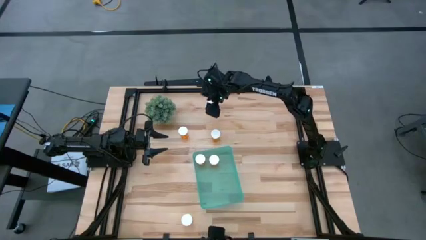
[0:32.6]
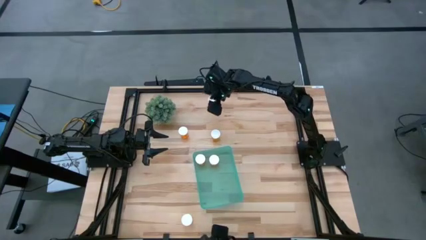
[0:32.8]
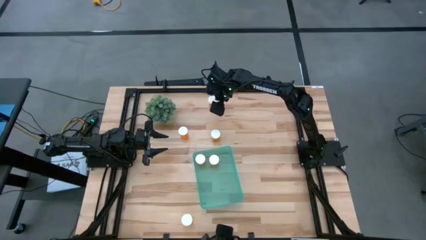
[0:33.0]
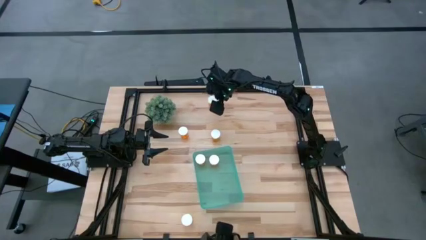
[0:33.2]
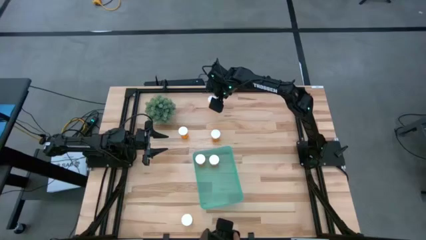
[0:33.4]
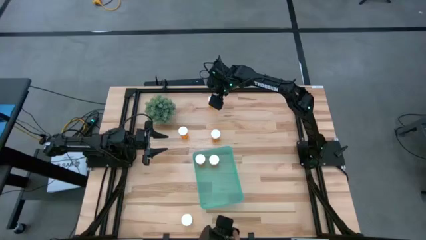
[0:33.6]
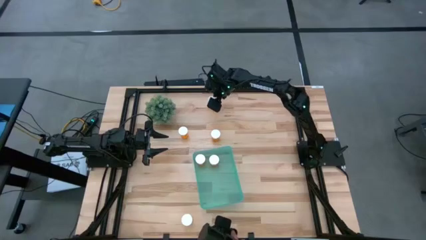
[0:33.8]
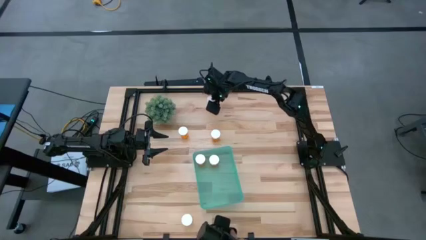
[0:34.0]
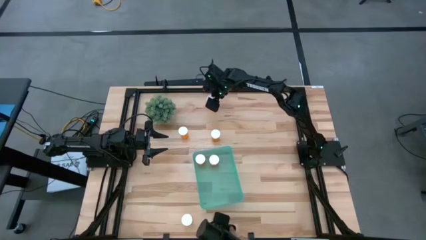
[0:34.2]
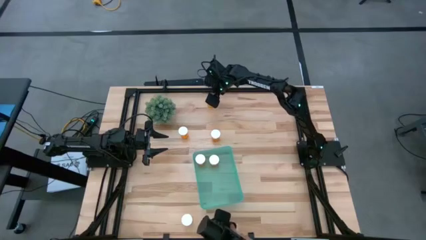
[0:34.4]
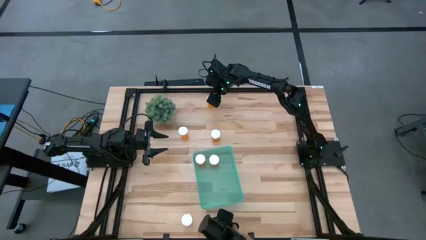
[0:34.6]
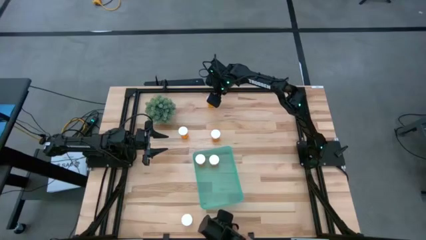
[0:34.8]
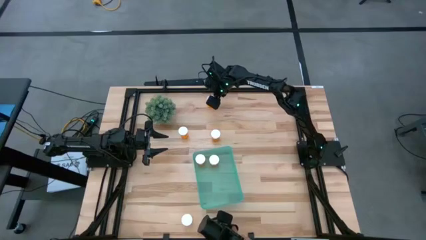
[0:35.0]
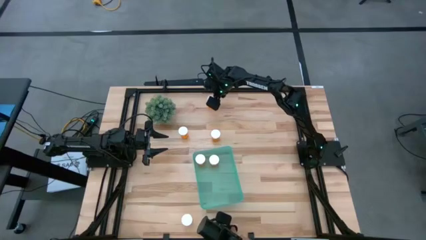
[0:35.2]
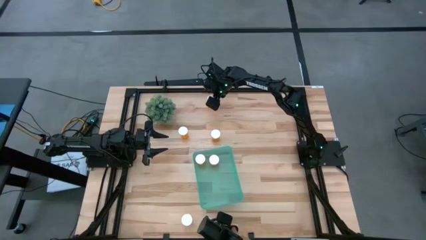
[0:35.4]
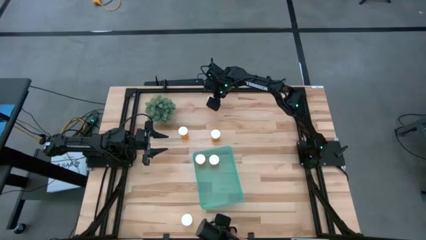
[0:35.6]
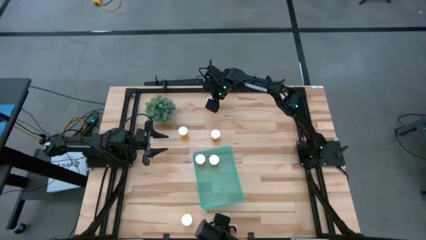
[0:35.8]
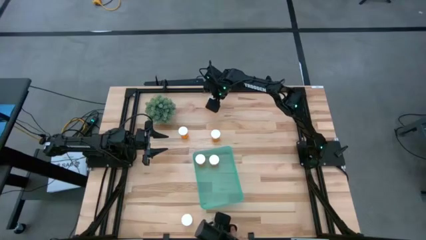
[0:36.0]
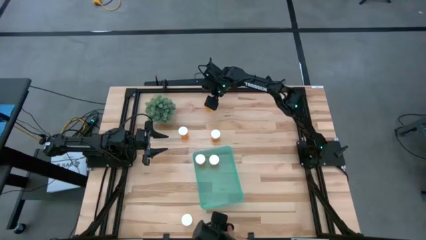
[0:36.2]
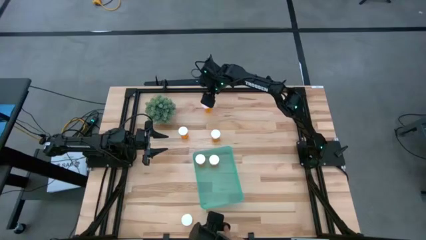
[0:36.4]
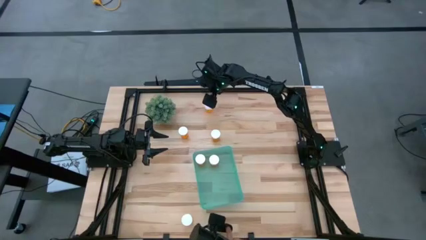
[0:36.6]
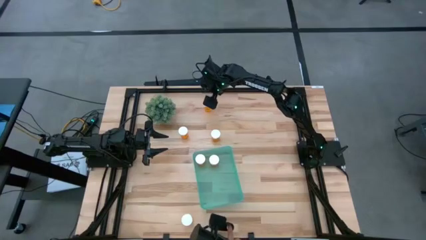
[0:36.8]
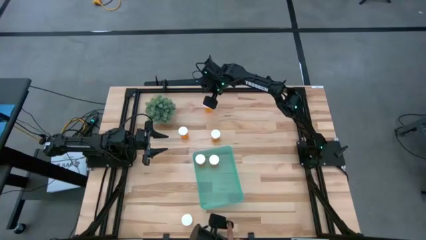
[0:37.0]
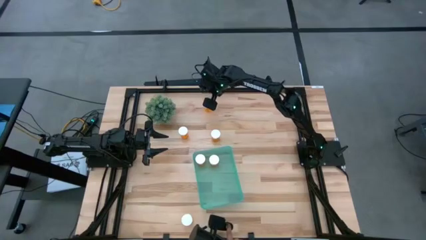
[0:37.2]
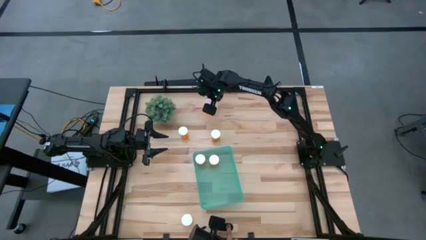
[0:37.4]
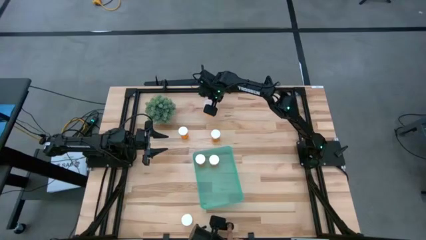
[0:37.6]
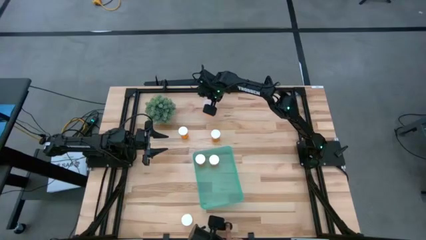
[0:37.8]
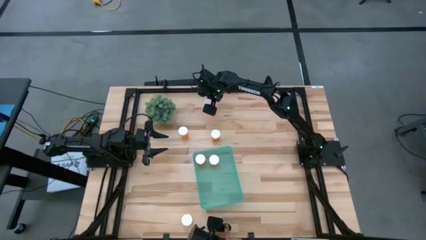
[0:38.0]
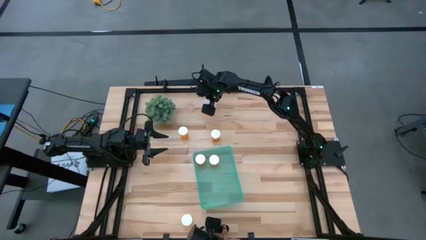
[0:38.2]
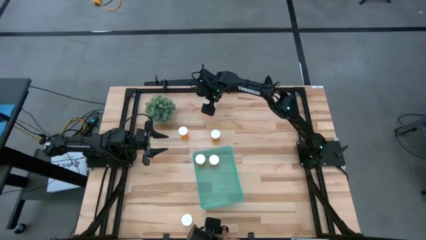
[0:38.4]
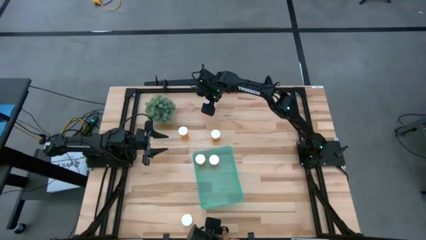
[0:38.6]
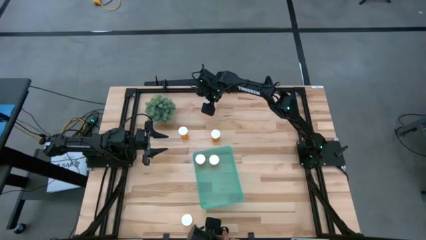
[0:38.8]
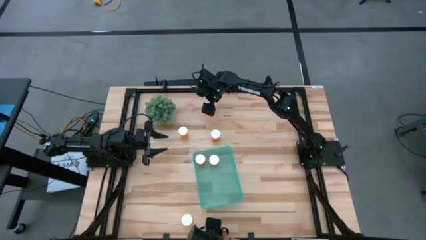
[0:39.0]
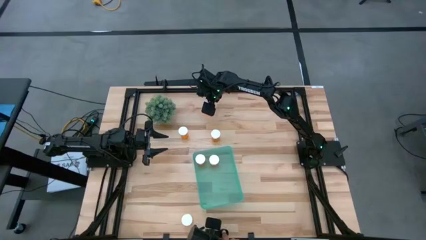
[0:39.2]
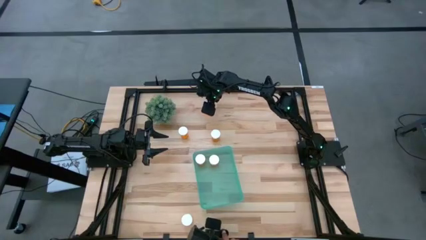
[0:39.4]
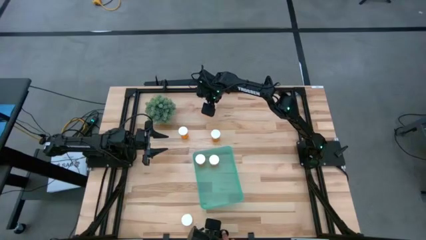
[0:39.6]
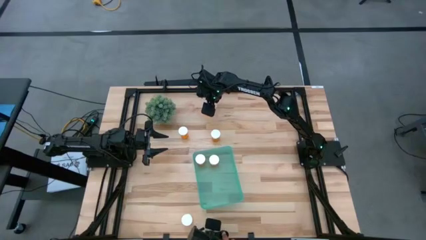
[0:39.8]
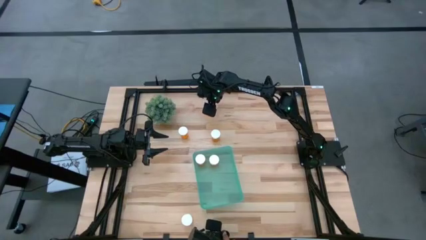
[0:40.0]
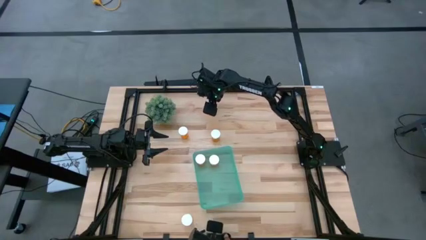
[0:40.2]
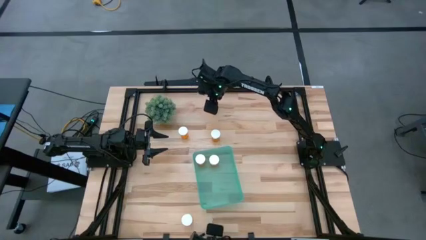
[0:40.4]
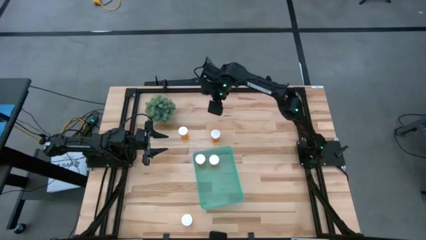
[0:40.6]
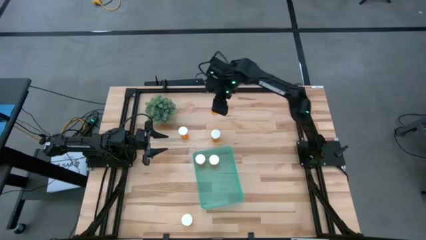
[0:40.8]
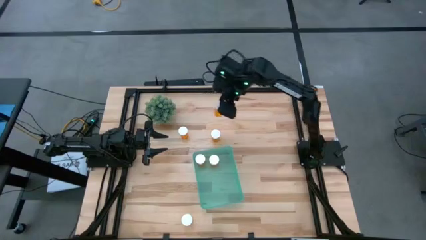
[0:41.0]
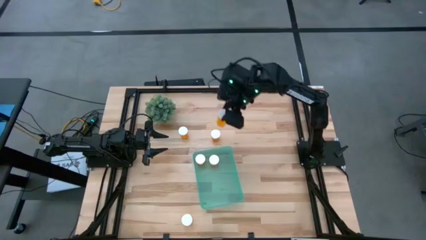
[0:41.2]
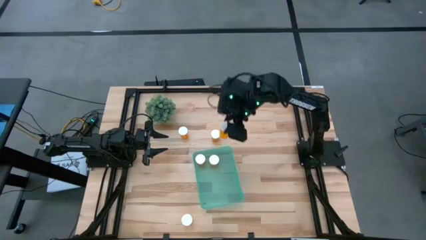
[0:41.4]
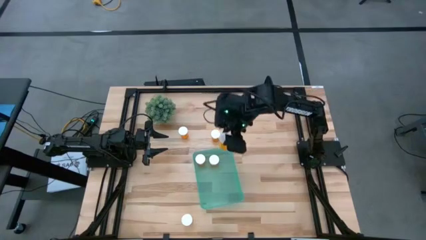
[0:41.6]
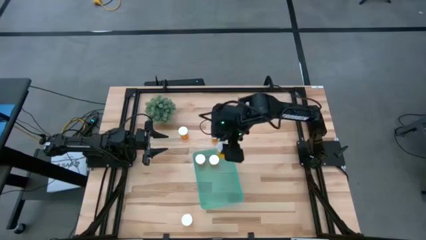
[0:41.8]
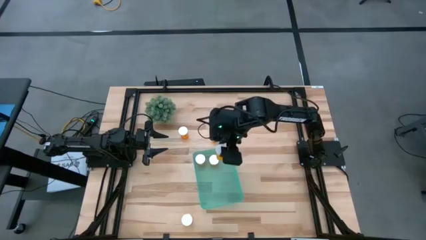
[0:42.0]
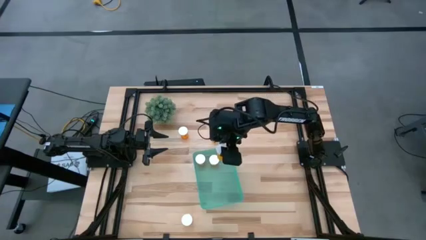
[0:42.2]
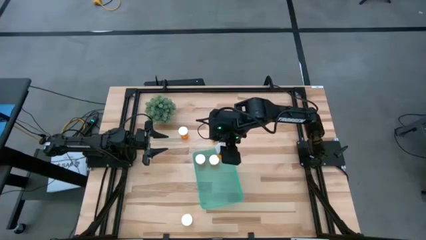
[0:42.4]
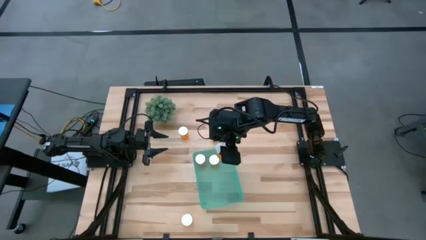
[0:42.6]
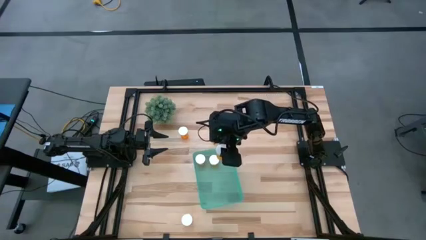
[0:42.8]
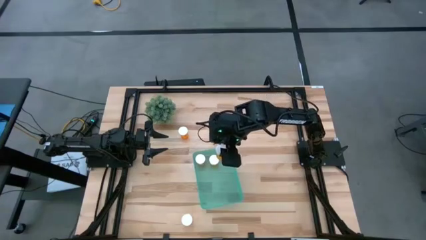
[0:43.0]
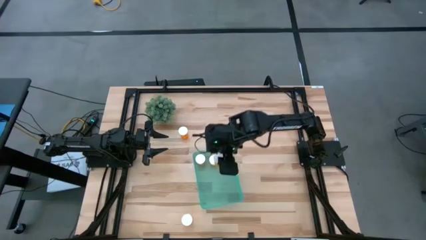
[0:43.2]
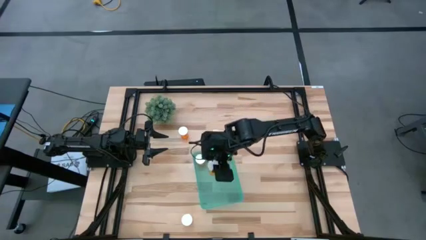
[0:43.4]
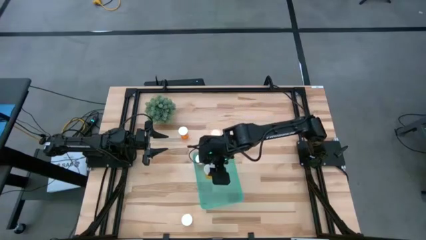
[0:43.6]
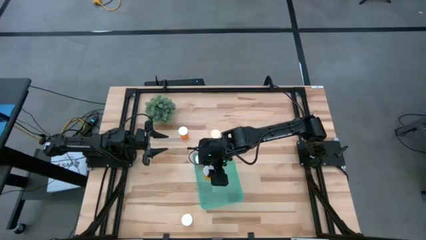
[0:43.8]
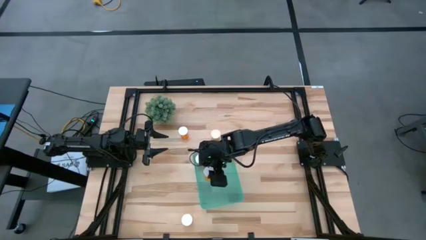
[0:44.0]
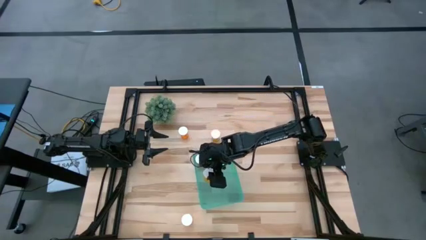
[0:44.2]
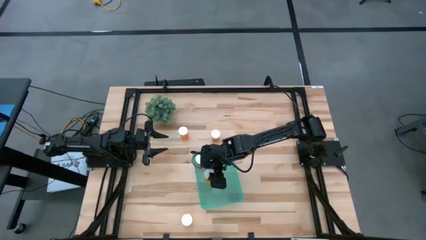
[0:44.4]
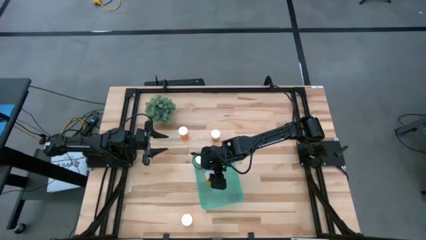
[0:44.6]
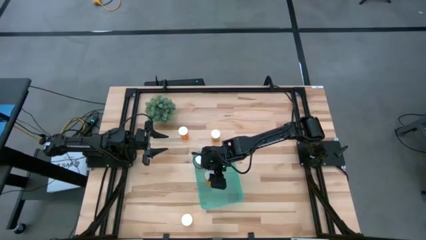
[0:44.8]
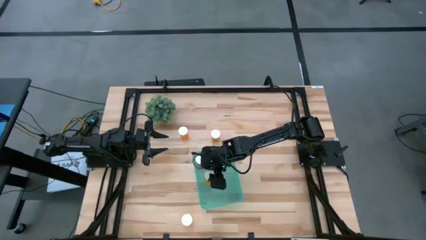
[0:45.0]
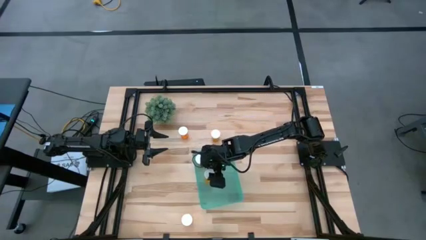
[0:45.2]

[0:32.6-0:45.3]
Task: Pick and place pill bottles into a basket
Put the orange pill bottle into the green bin
